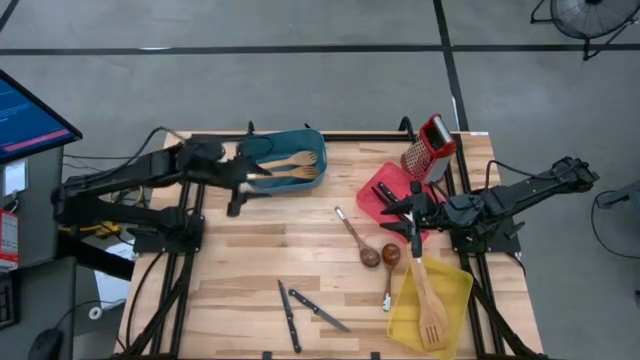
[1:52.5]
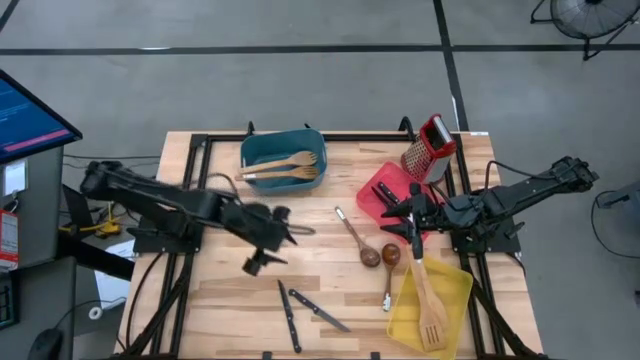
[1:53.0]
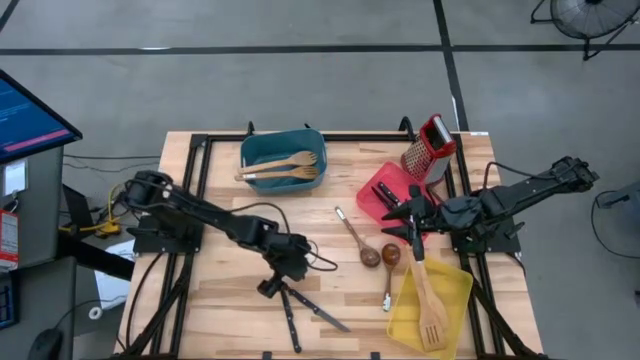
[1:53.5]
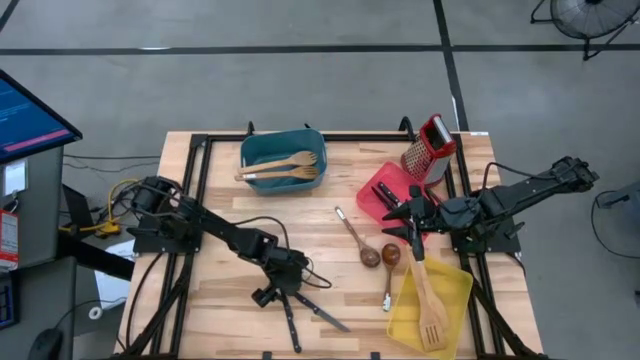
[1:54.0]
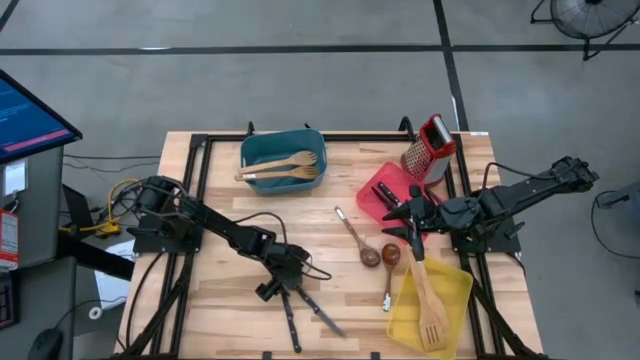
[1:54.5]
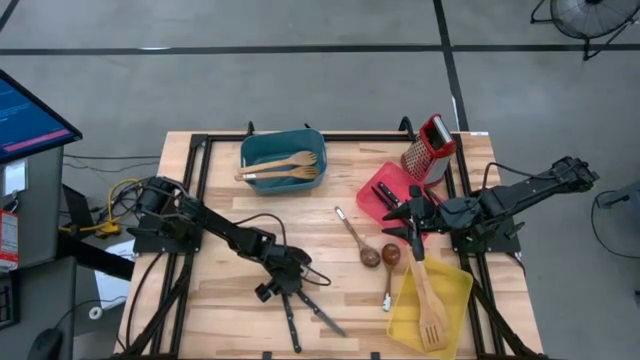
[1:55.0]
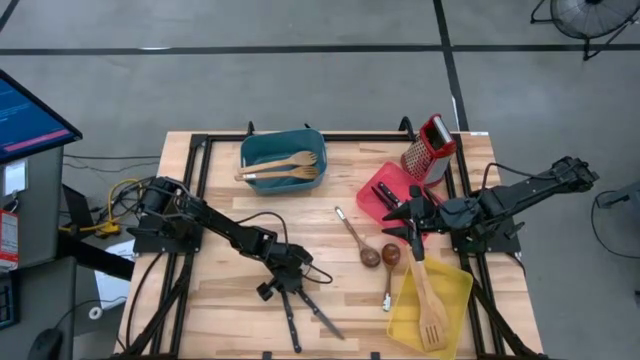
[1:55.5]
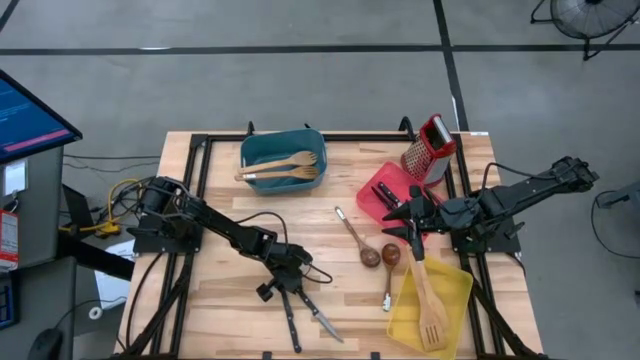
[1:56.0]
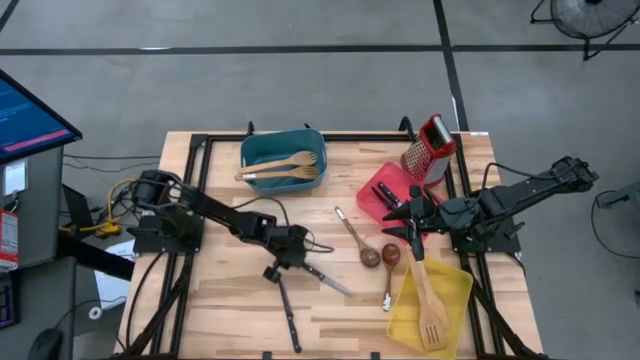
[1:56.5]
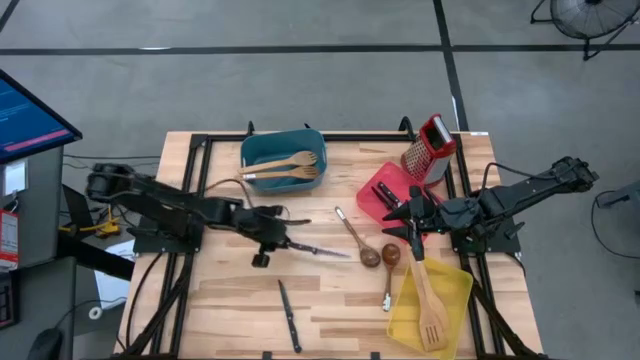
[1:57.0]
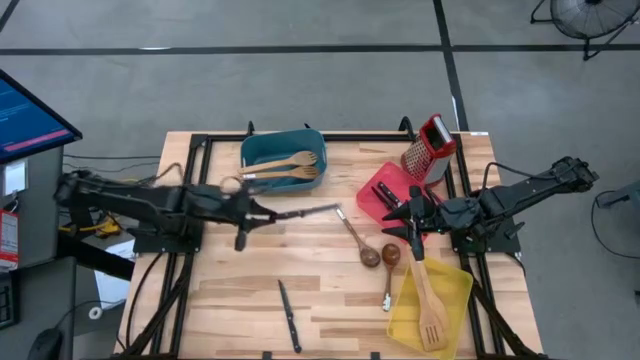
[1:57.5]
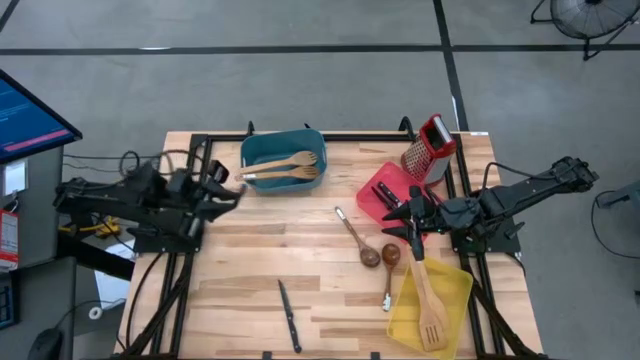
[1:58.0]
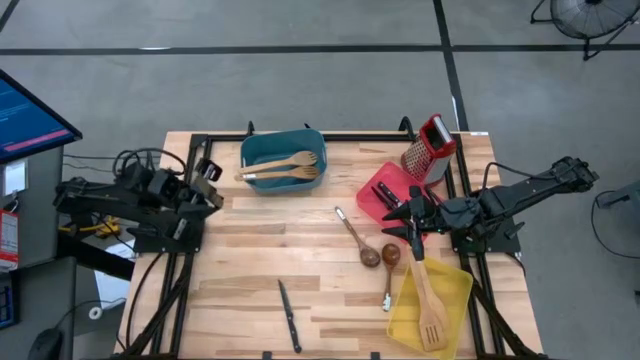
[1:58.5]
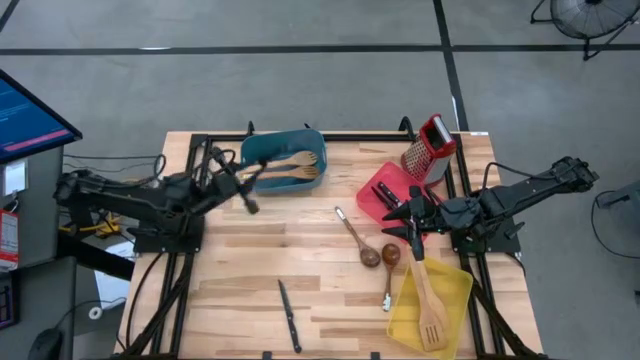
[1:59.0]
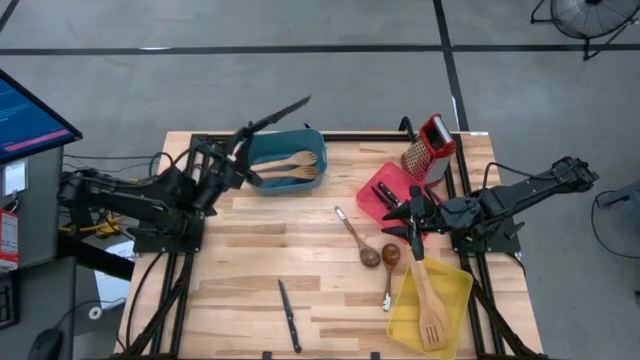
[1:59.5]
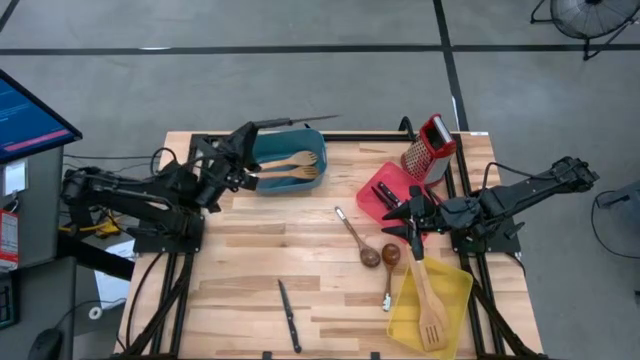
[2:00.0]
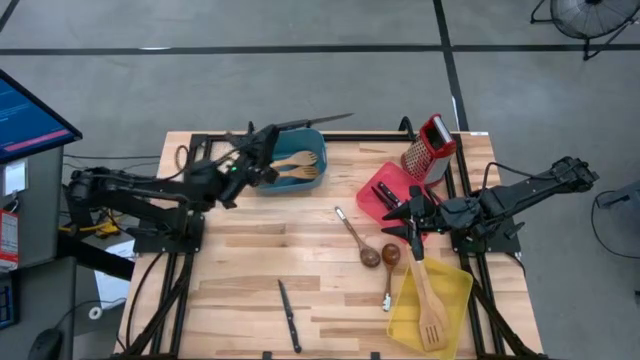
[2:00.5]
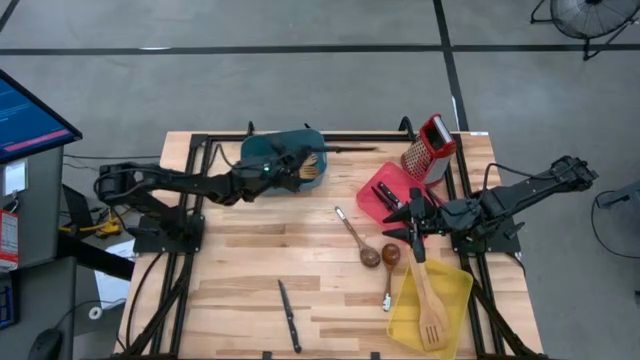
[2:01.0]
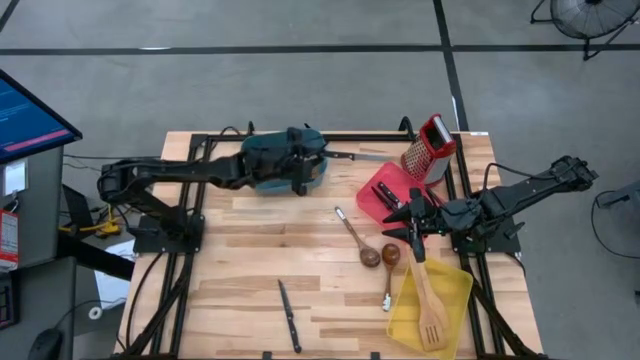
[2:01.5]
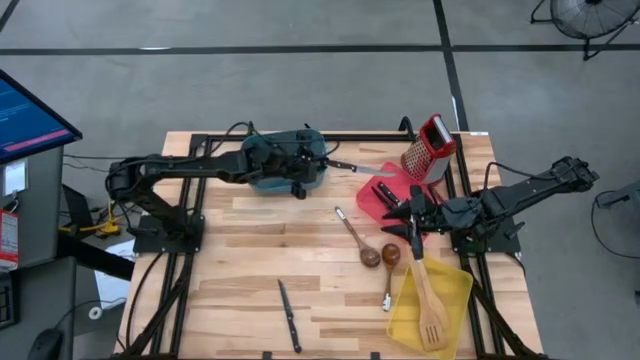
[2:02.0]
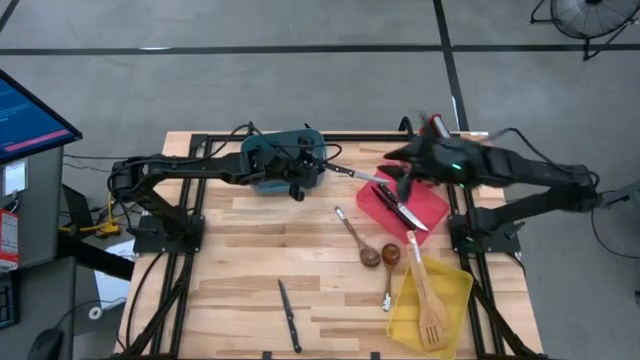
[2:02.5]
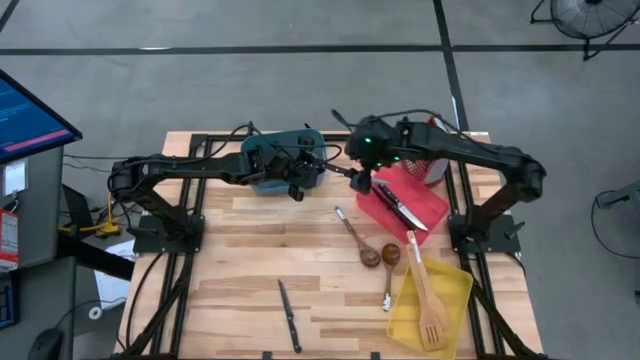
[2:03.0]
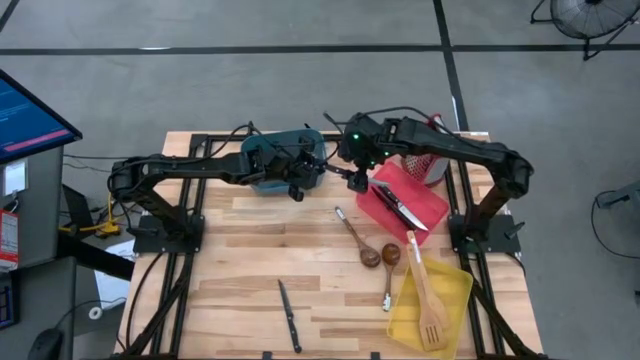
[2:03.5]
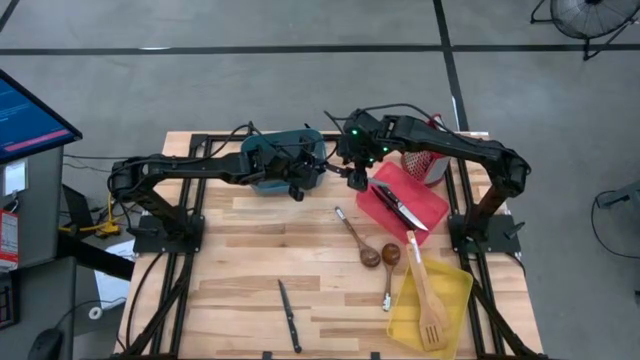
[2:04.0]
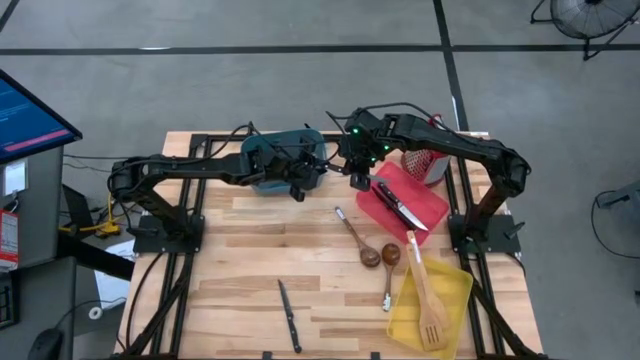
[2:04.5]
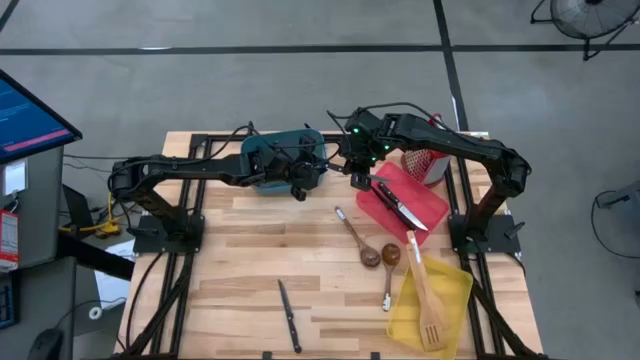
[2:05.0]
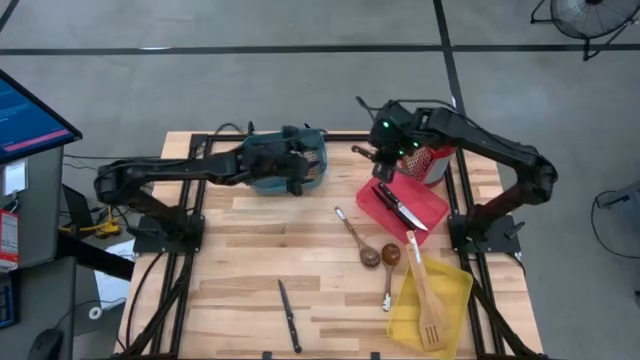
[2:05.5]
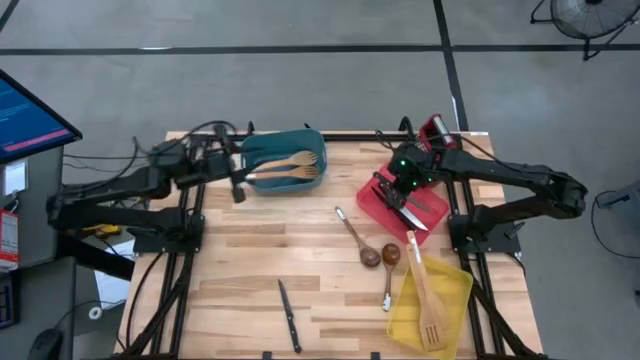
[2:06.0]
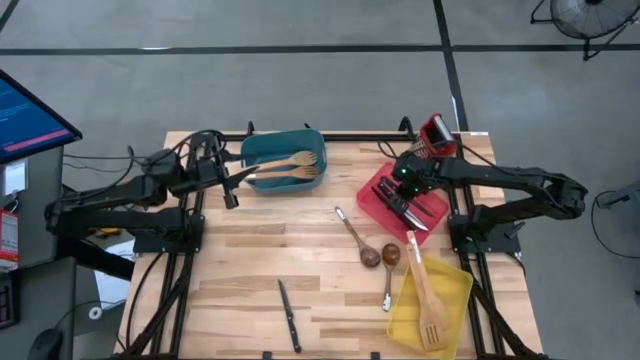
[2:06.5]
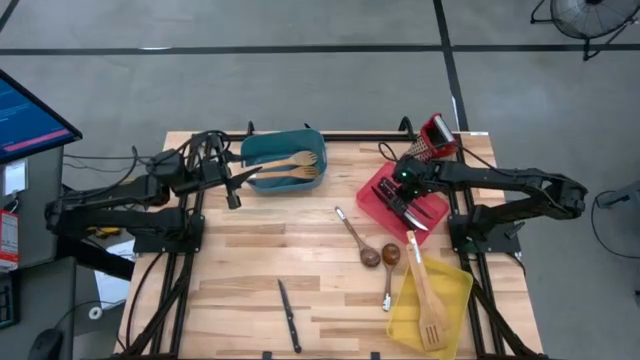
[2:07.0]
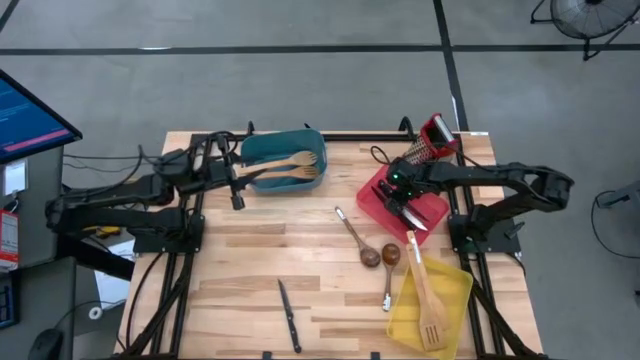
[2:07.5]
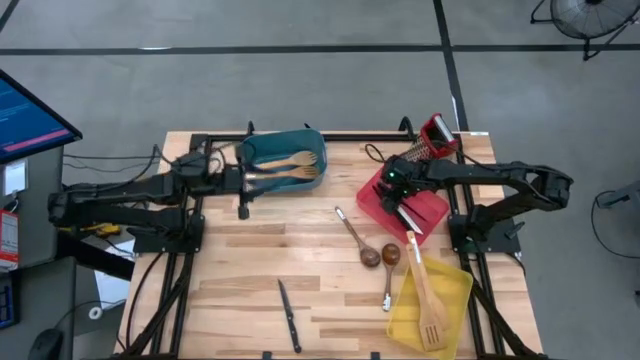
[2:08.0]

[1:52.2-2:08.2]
Task: Pick & Place Kitchen Items
Put the black kitchen knife into the red bin

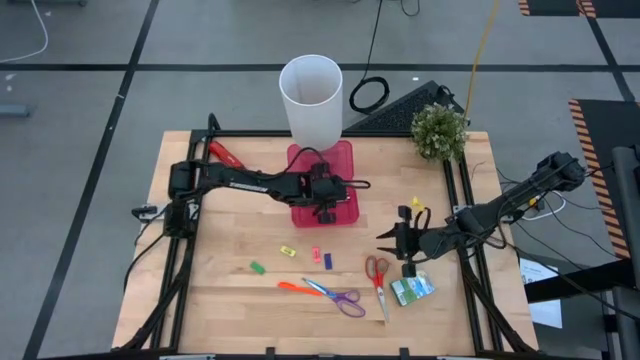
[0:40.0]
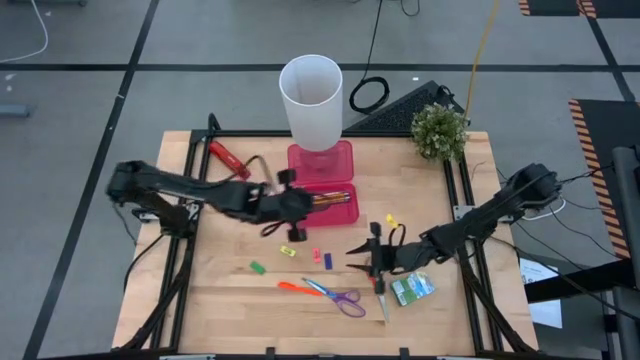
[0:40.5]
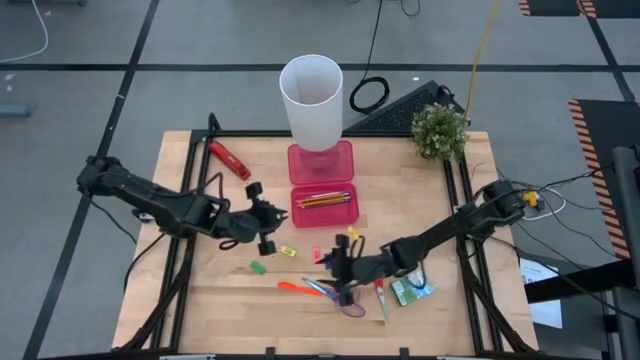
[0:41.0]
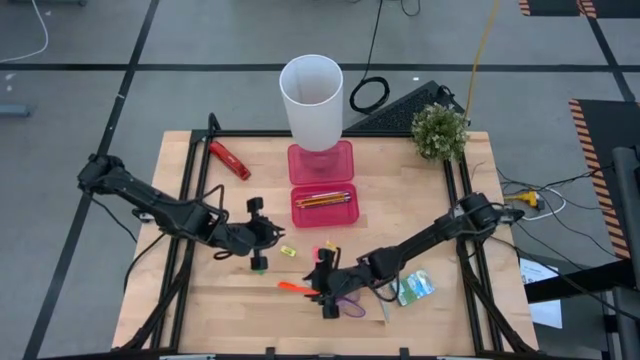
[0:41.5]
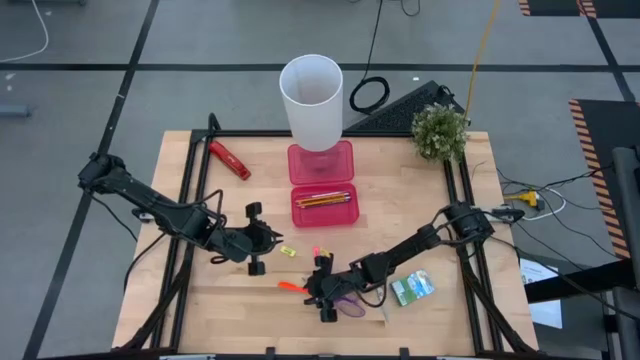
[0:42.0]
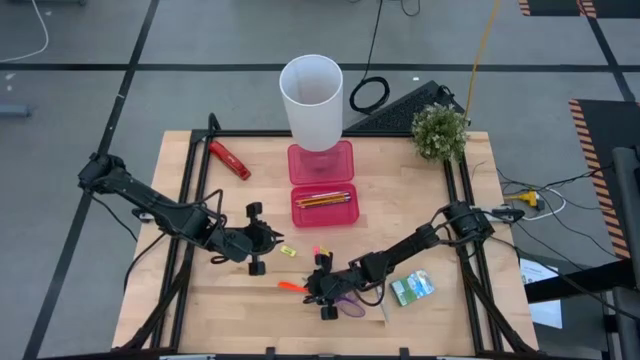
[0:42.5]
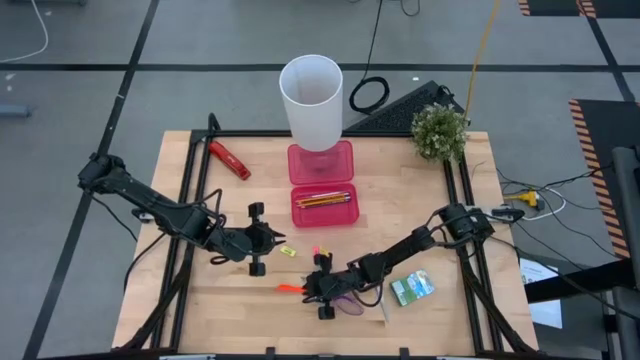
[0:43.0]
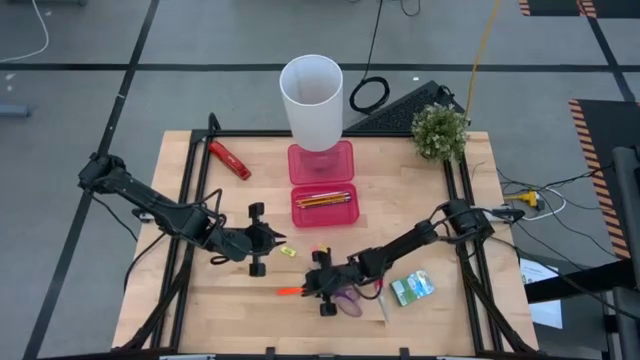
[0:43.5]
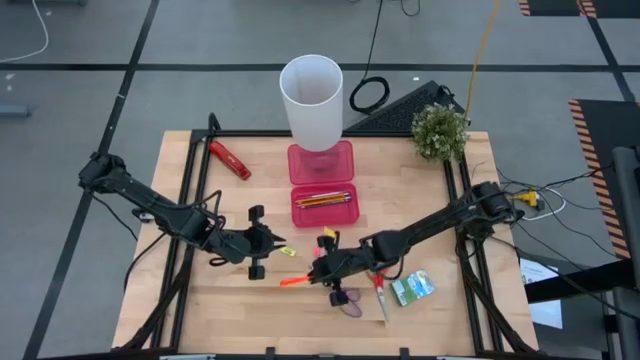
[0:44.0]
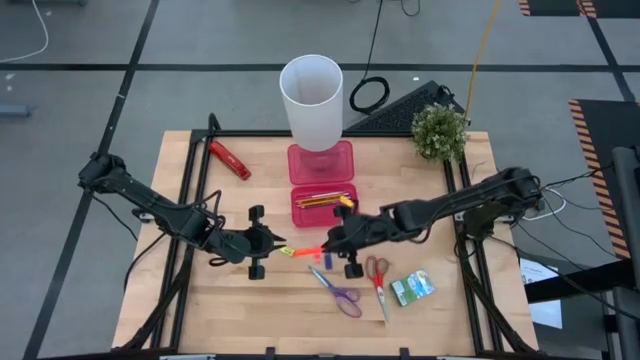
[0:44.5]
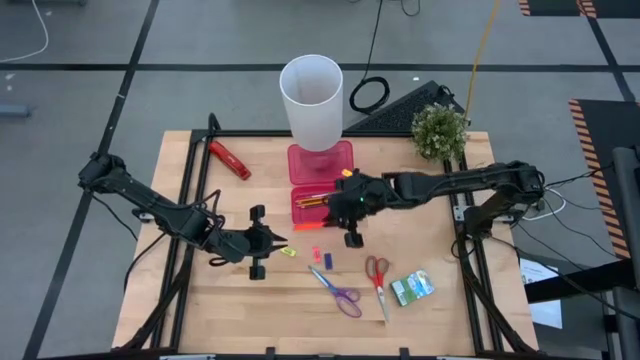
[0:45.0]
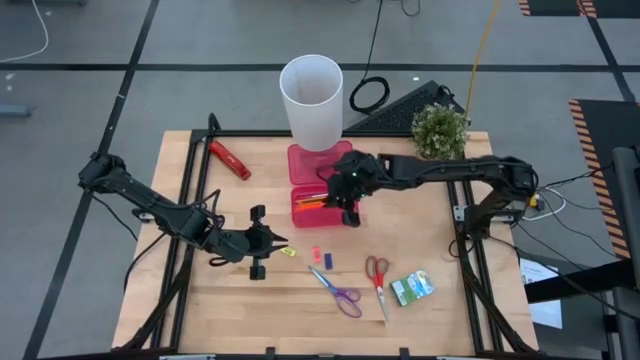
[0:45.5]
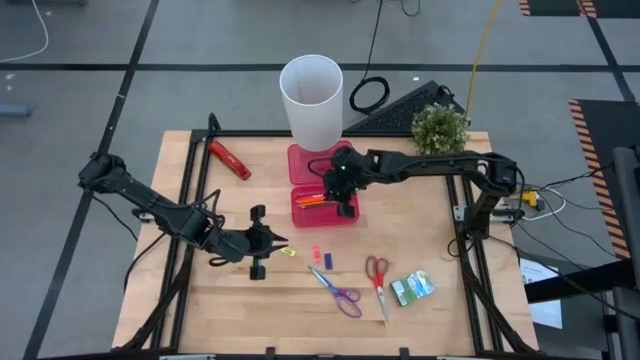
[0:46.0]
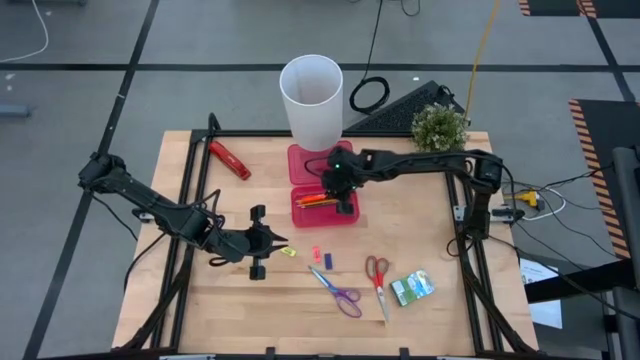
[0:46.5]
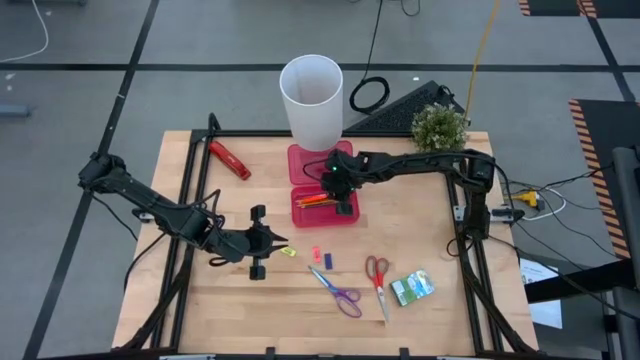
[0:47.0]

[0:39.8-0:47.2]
Task: Pack school essentials
Put the orange pen into the pink supply box
